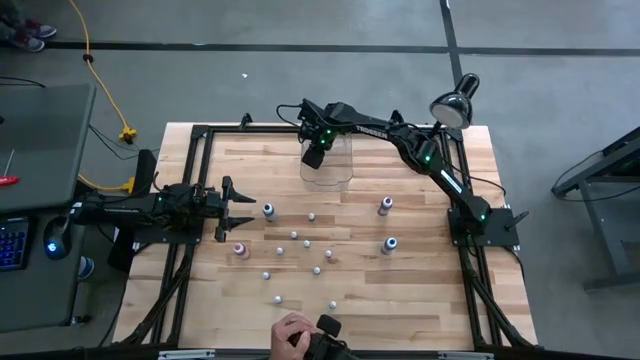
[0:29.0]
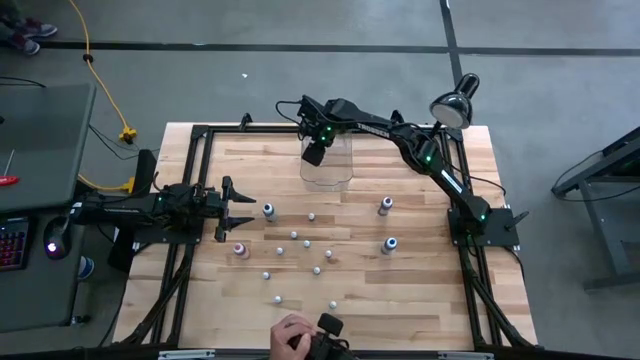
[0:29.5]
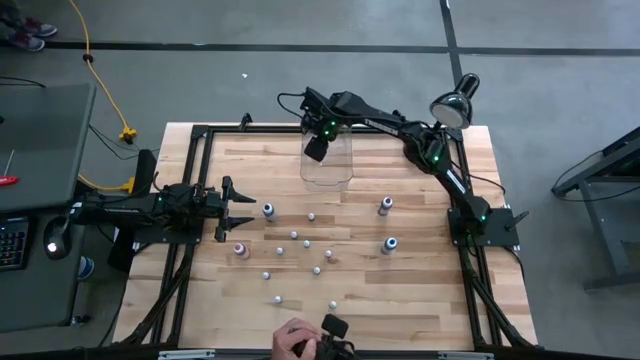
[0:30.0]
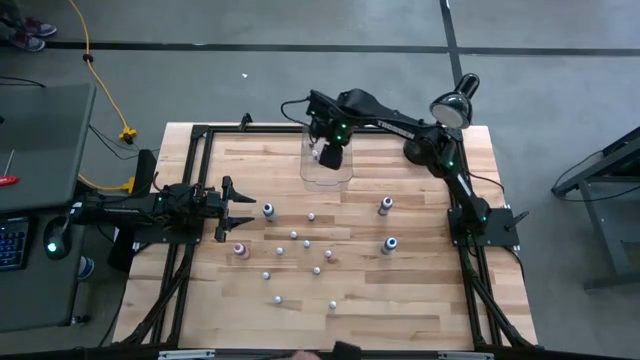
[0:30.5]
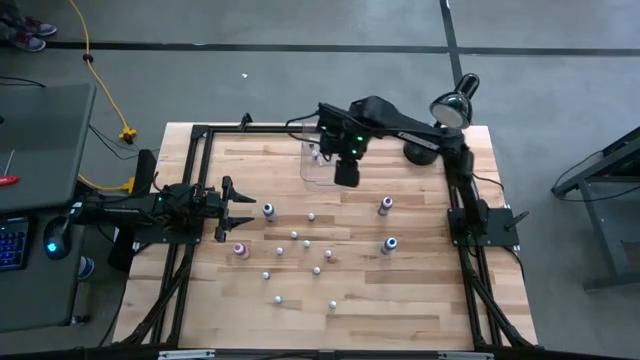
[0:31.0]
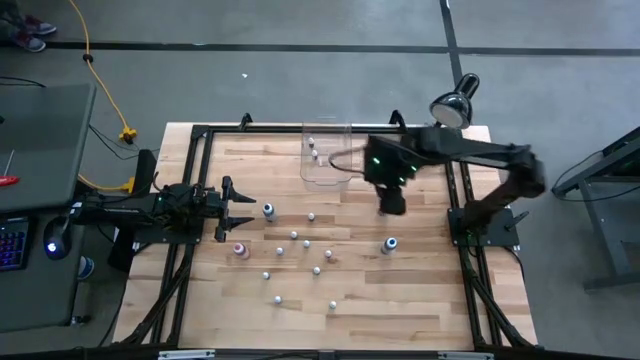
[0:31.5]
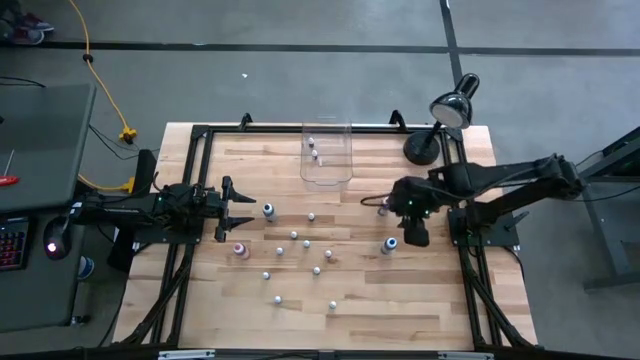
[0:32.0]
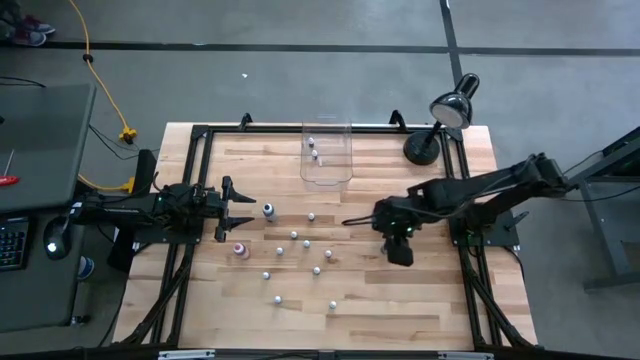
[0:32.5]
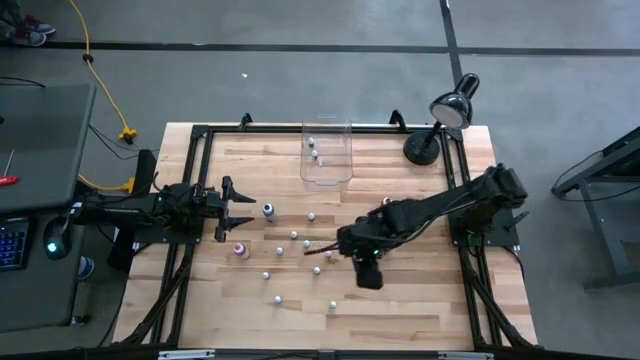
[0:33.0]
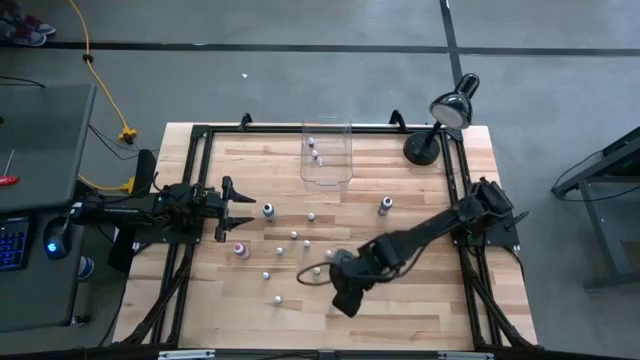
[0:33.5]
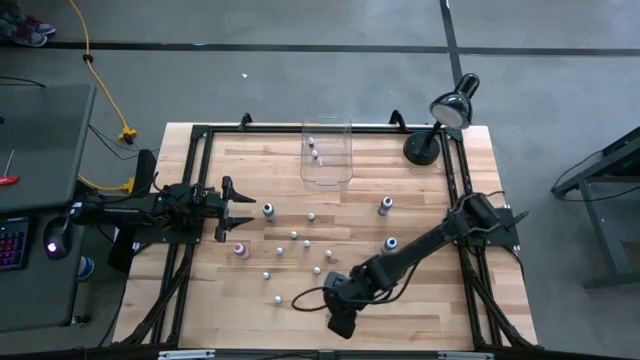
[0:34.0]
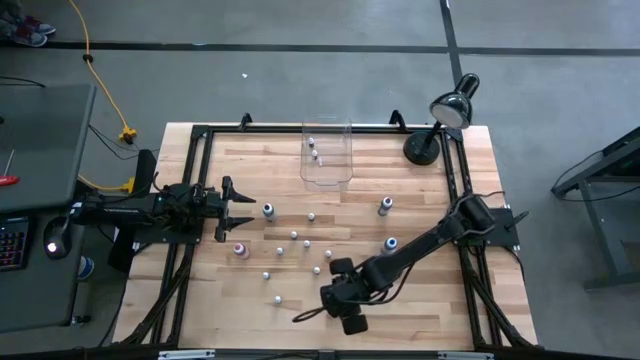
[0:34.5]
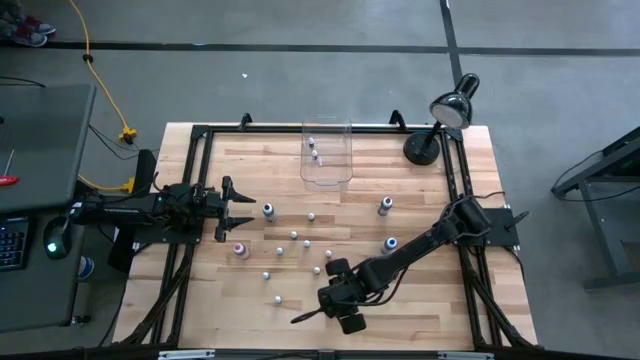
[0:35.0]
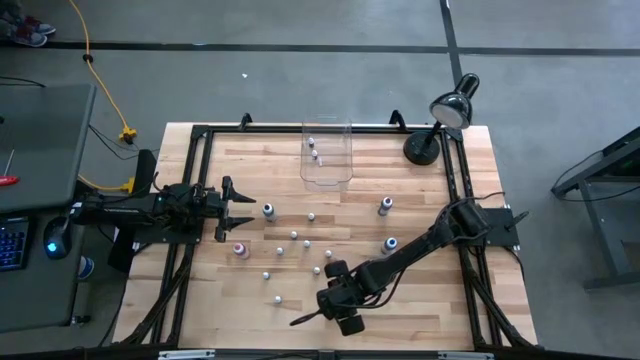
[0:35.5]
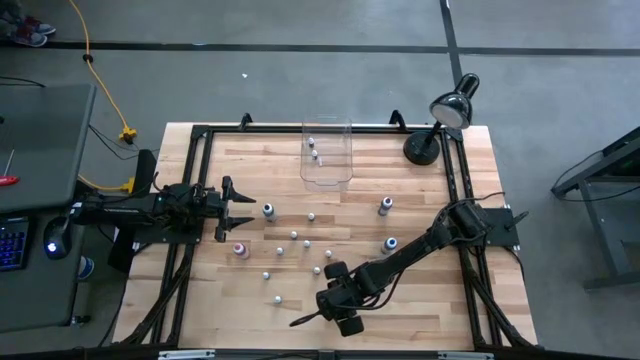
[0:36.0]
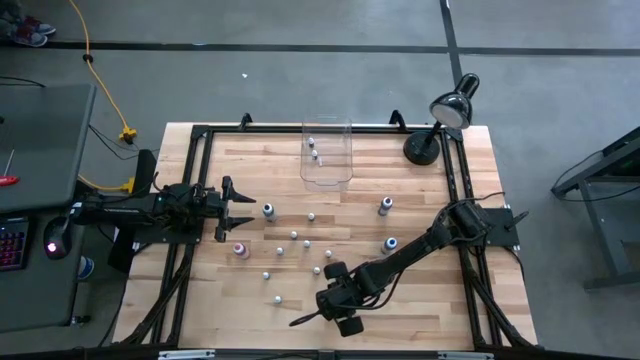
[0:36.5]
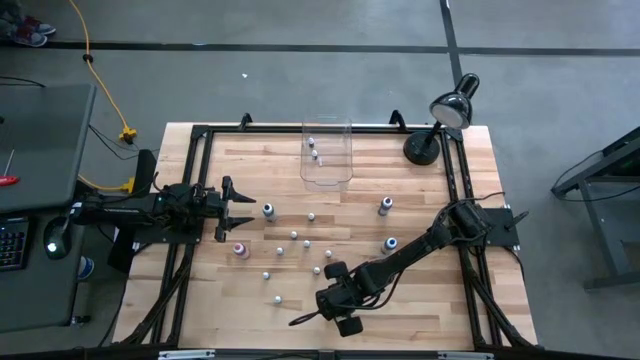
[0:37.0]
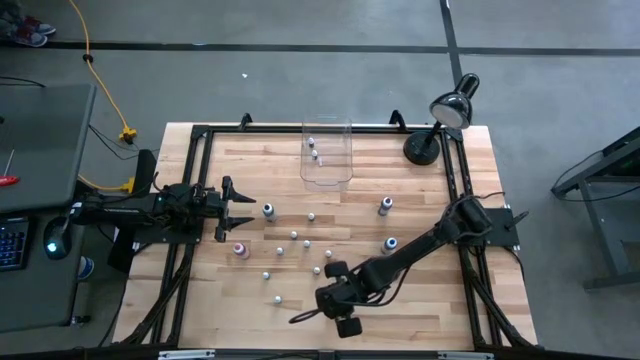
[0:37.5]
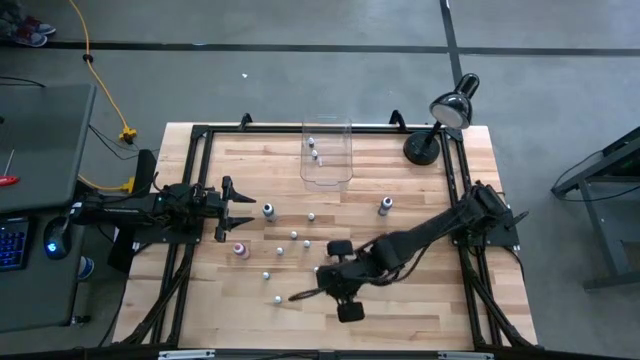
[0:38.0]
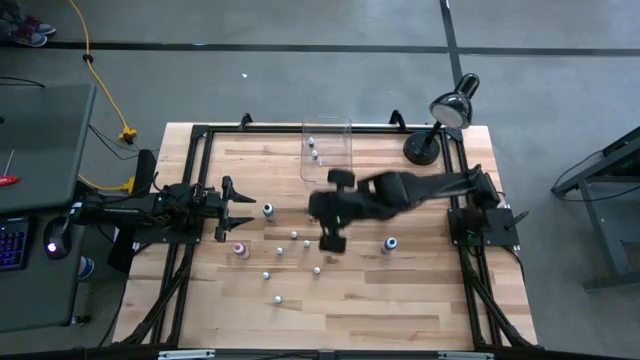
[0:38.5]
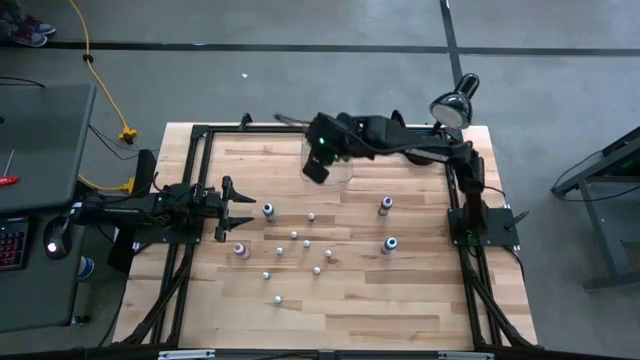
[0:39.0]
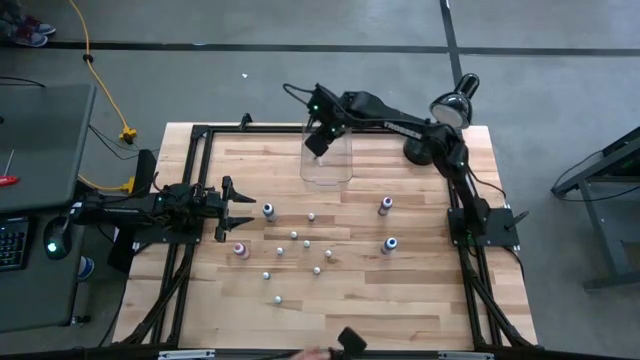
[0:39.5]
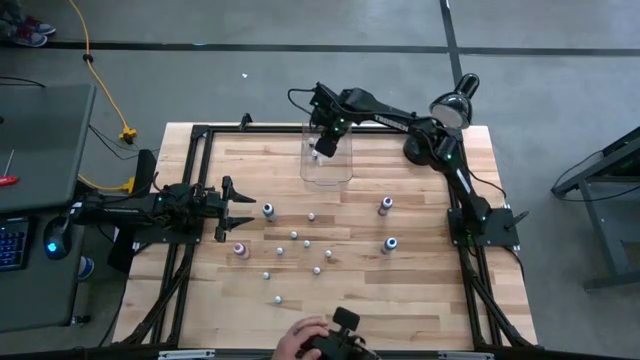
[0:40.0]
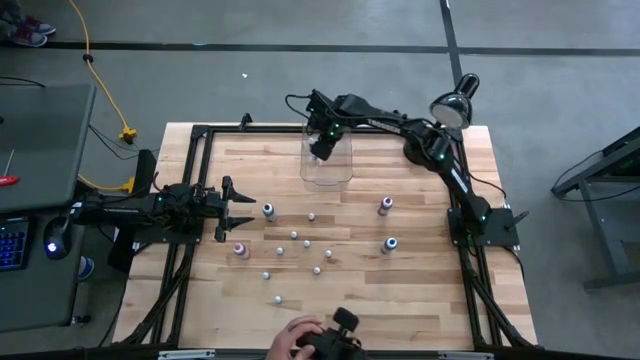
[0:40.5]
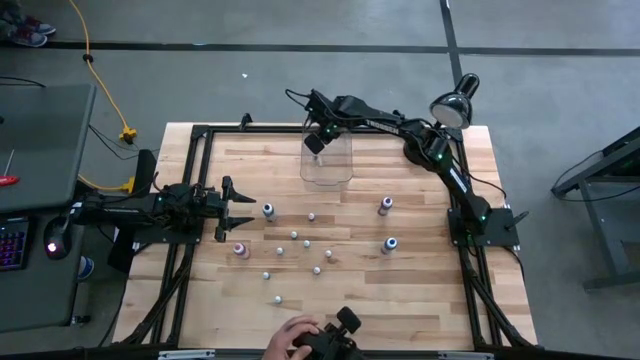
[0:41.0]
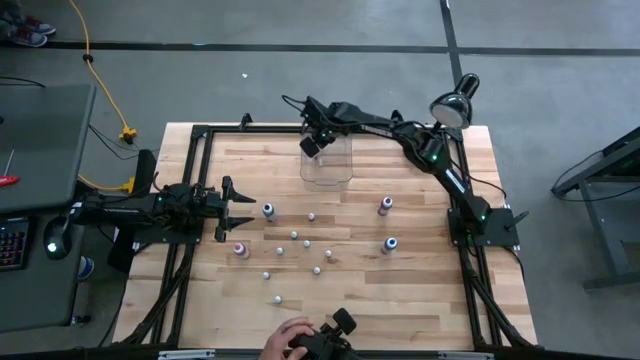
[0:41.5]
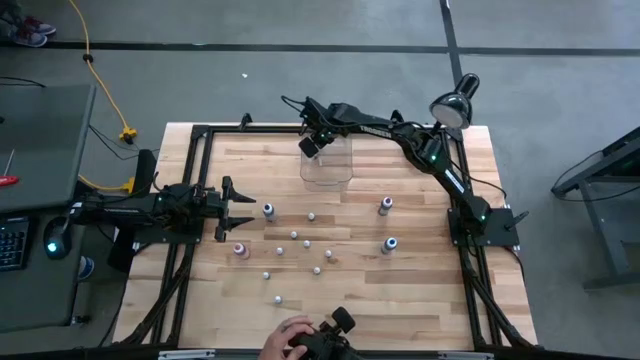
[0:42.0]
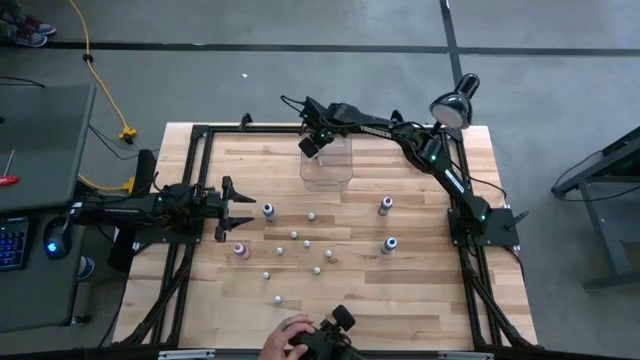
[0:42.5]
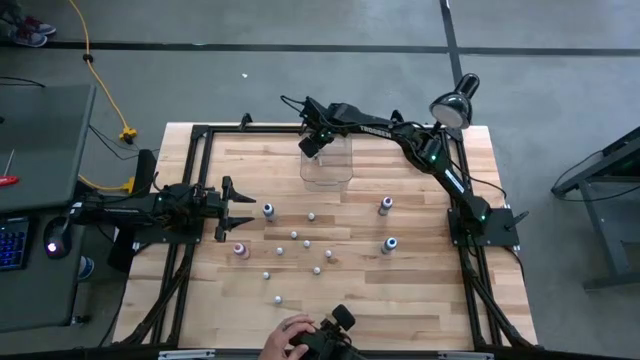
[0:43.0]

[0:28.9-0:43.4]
Task: Pick & Place food coloring
Put the small food coloring bottle into the transparent bin

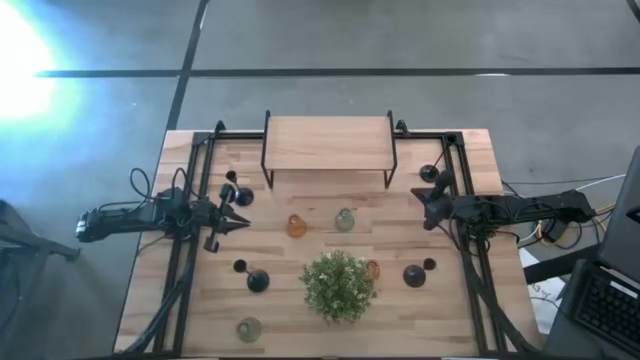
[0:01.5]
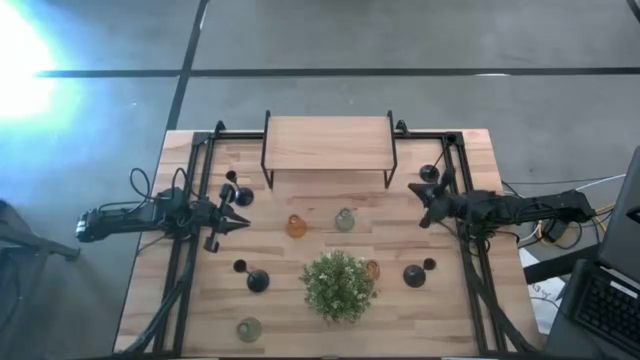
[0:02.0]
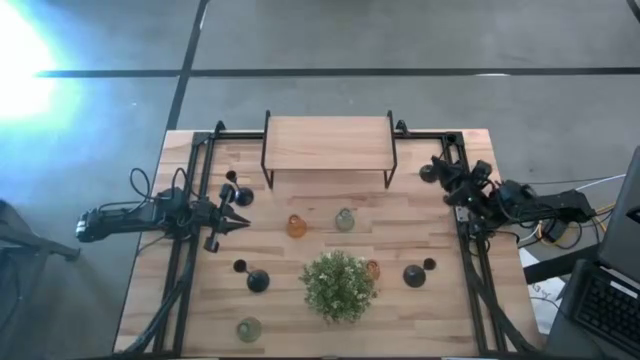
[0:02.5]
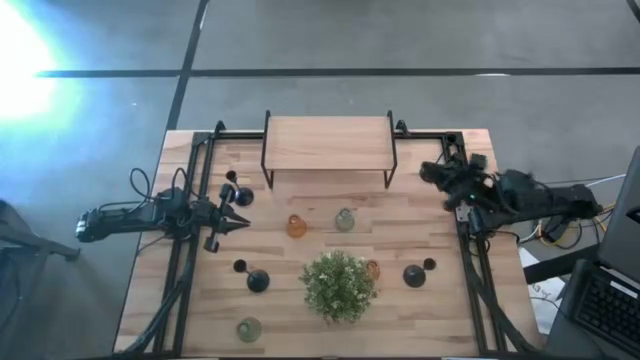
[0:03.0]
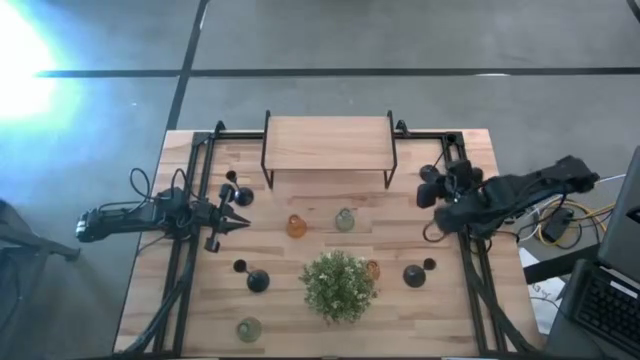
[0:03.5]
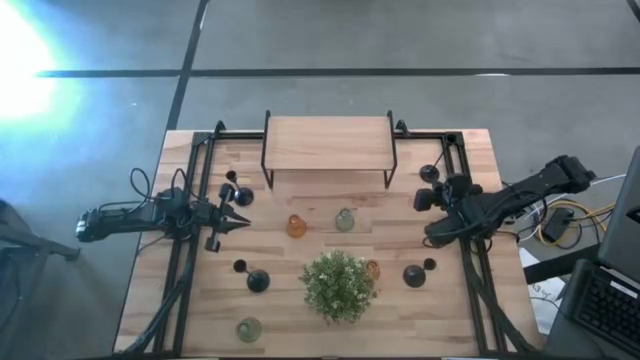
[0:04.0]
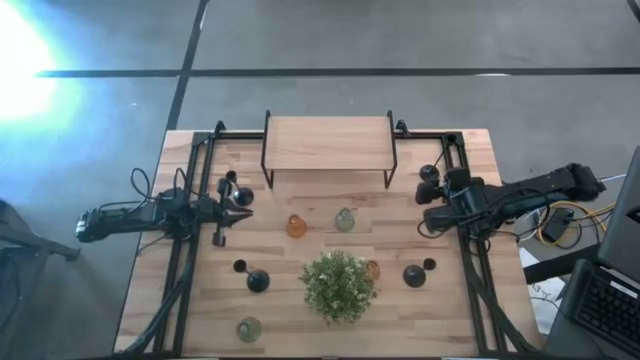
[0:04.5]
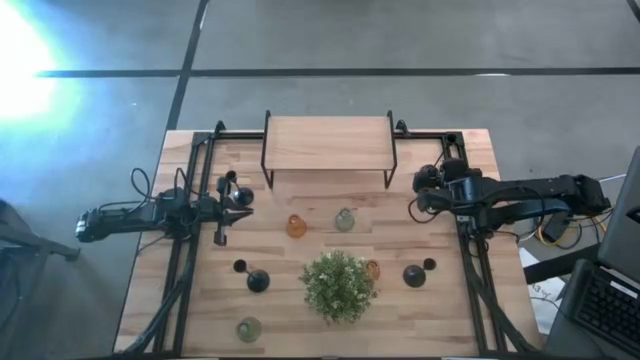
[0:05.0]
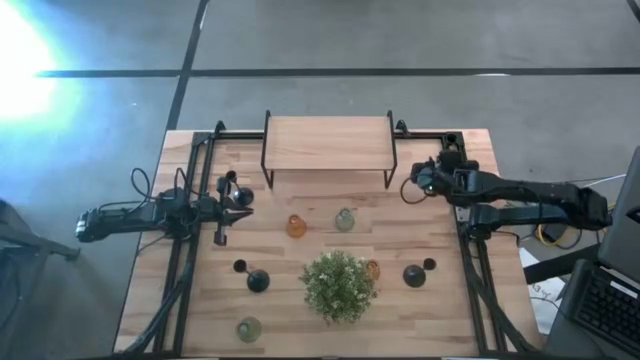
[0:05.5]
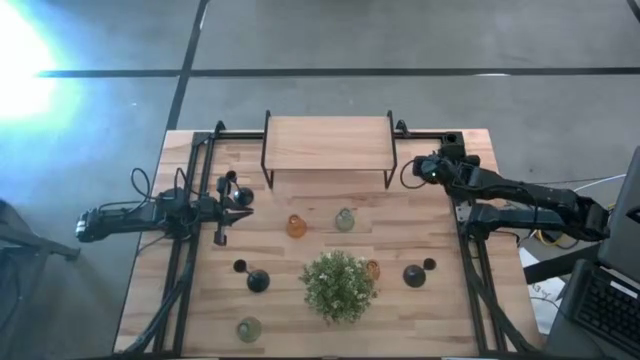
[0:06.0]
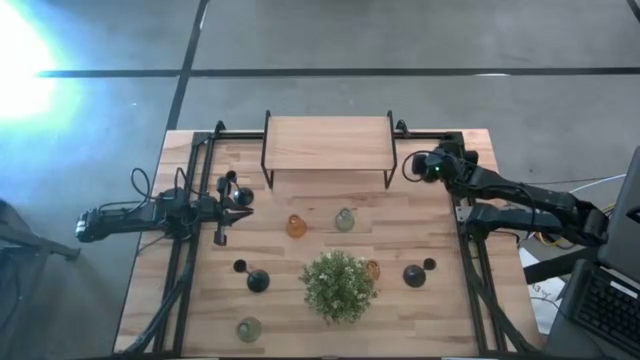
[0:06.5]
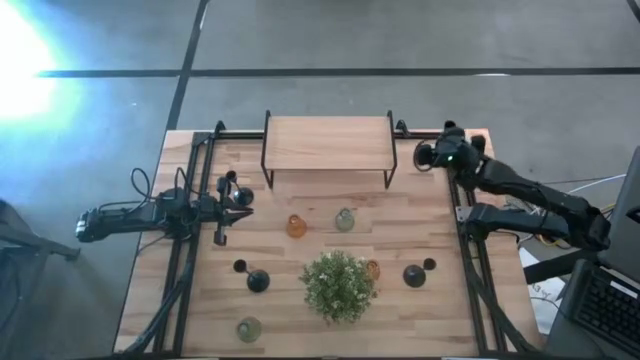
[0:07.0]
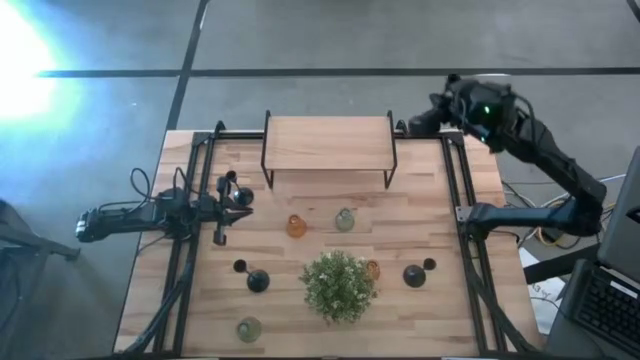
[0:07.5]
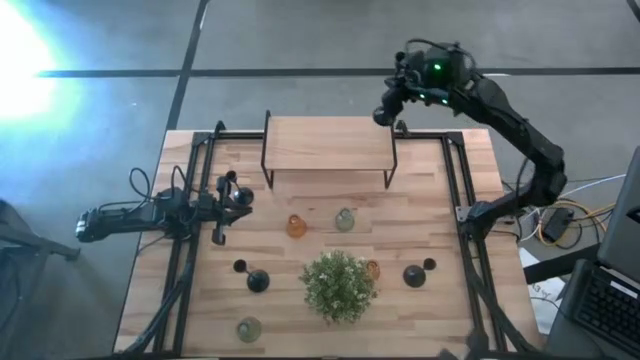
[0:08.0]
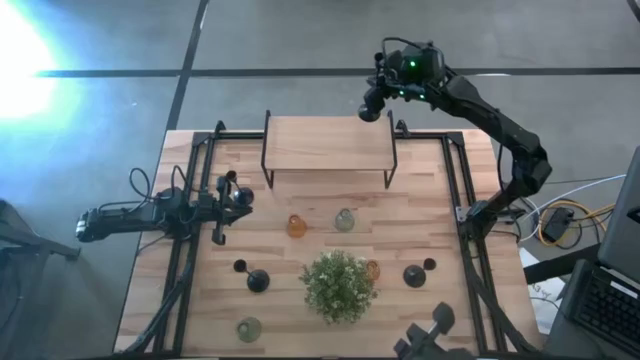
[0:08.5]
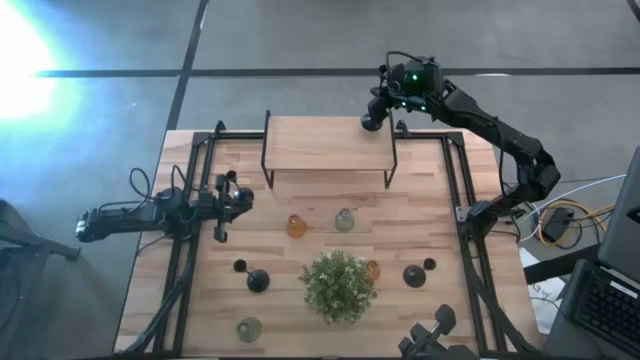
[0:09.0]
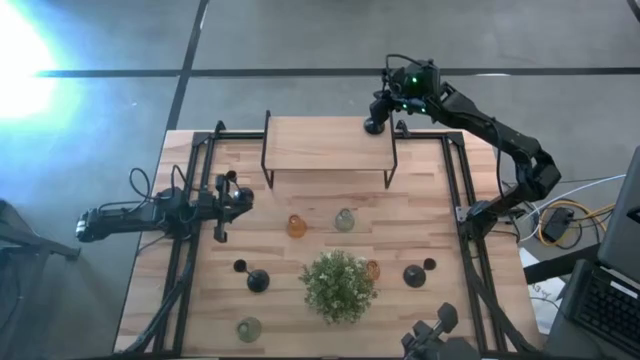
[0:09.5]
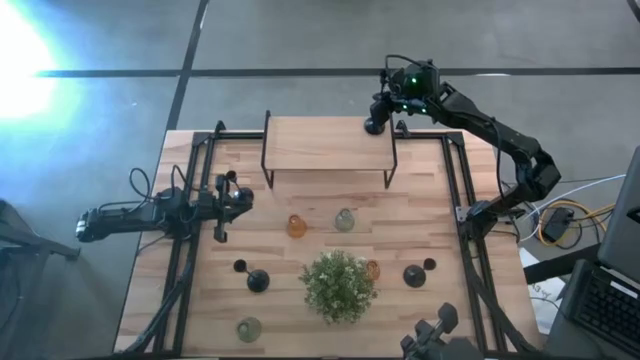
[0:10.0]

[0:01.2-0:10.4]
Task: Pick & Place candle stick holders
Put the right large black candle holder on the shelf
